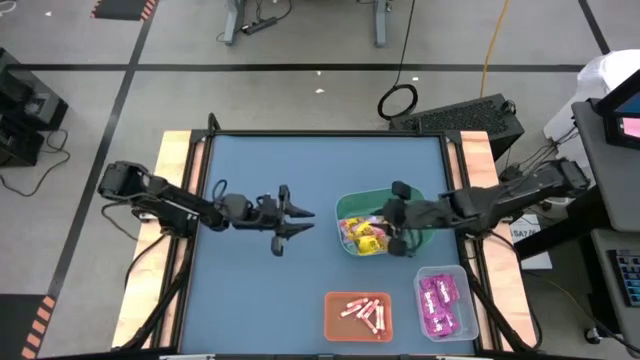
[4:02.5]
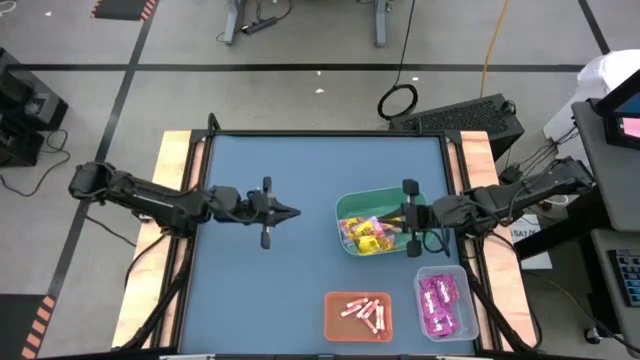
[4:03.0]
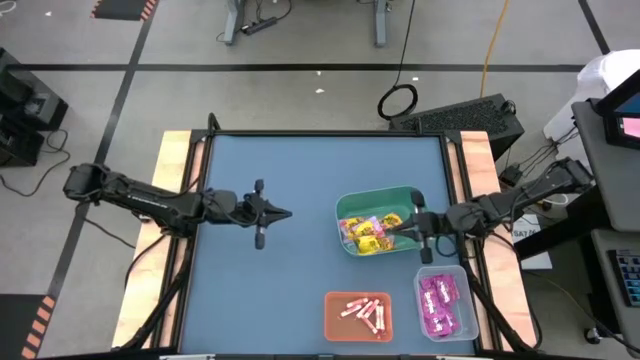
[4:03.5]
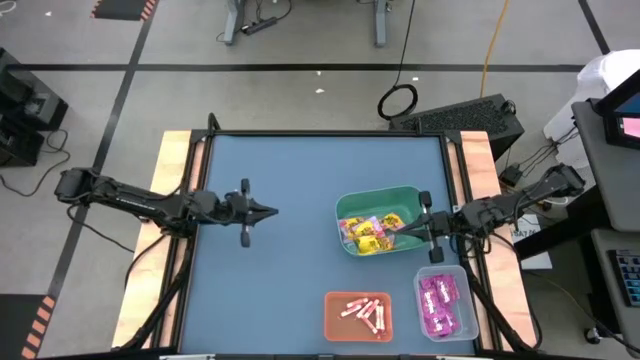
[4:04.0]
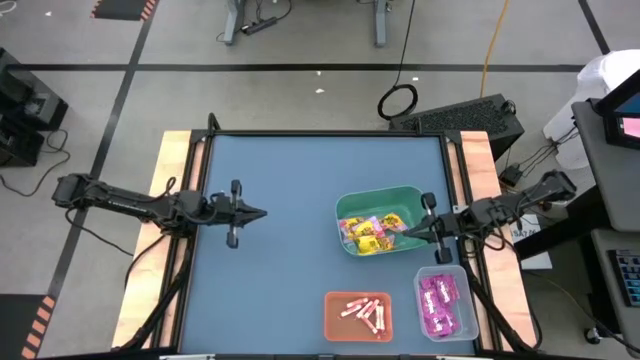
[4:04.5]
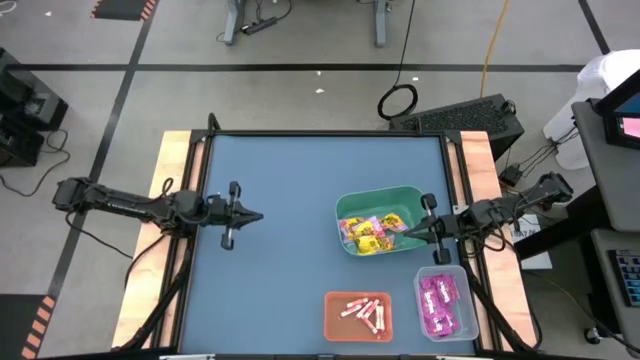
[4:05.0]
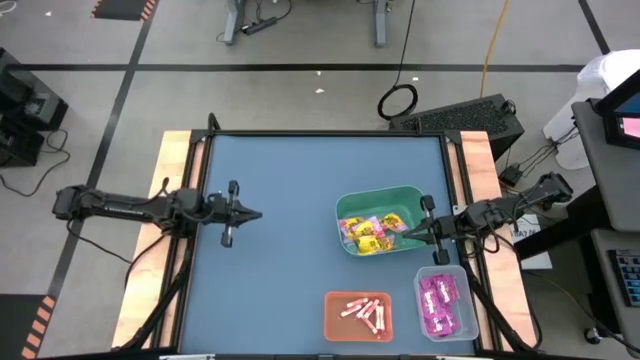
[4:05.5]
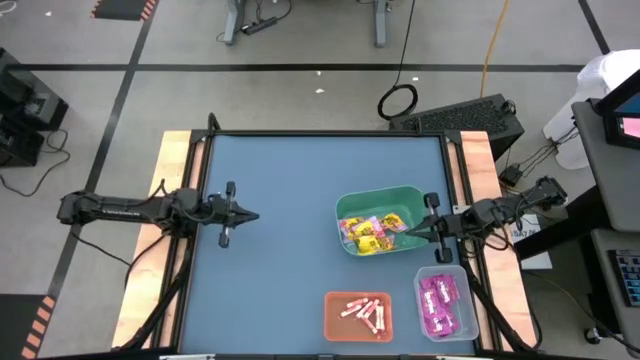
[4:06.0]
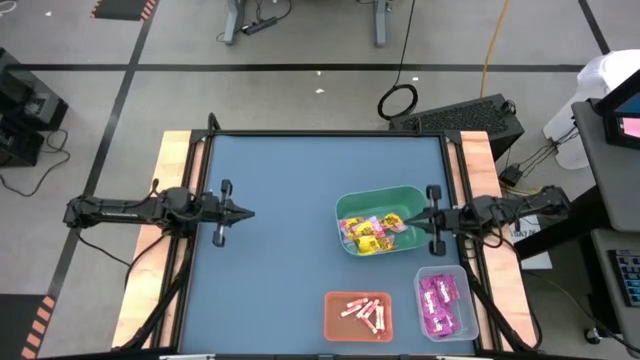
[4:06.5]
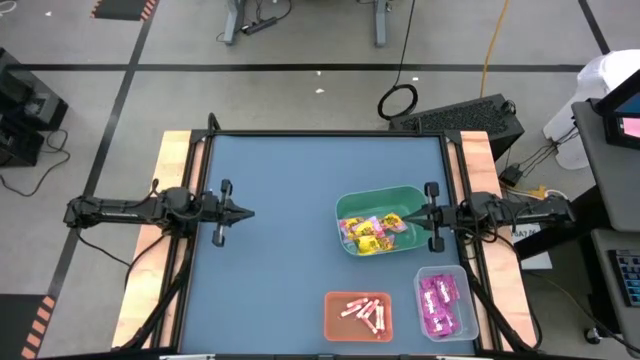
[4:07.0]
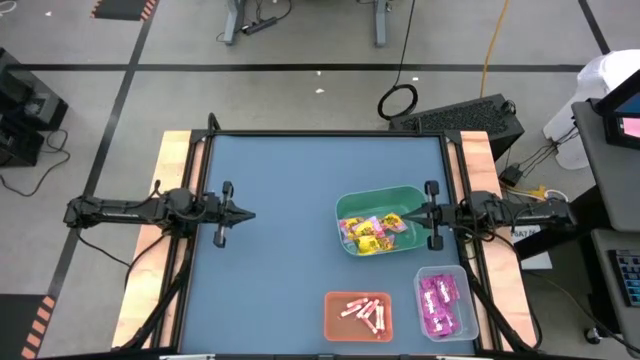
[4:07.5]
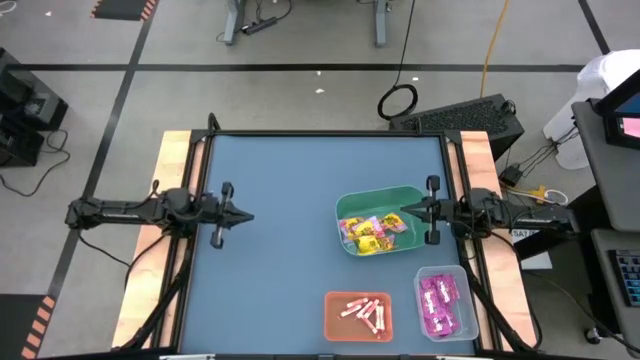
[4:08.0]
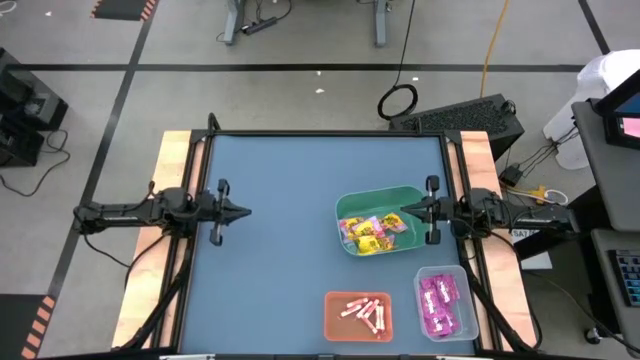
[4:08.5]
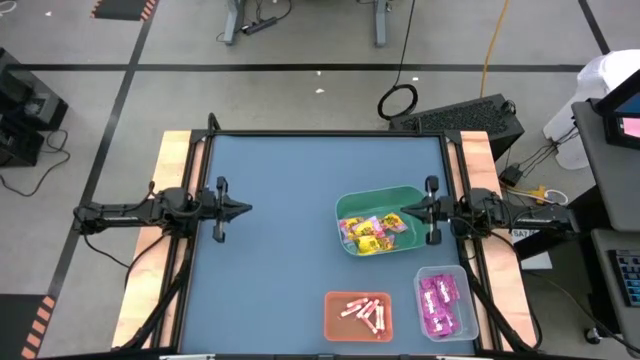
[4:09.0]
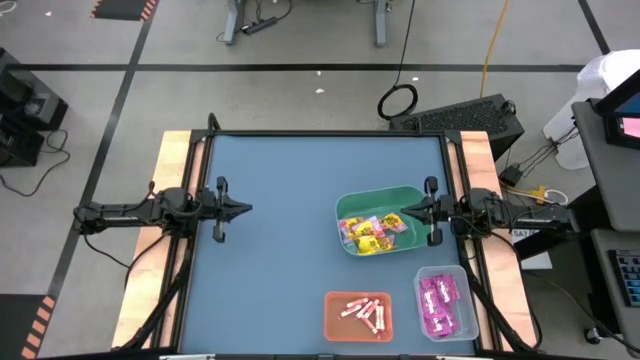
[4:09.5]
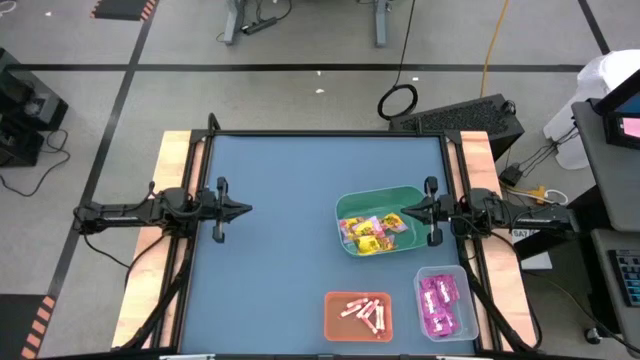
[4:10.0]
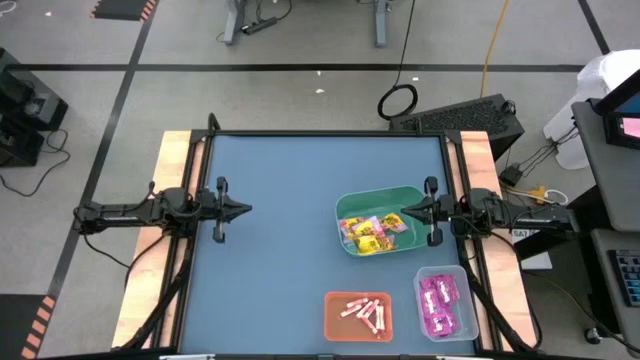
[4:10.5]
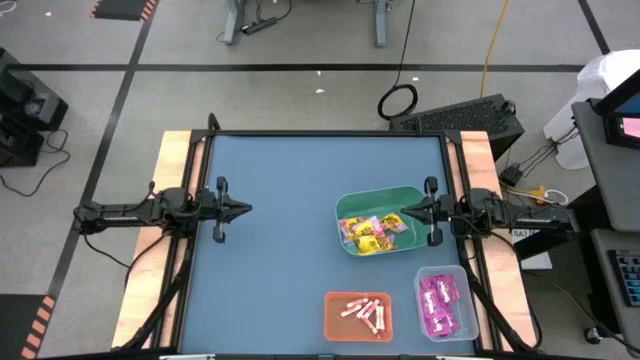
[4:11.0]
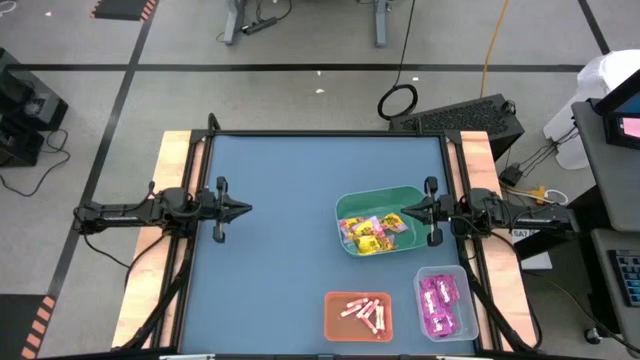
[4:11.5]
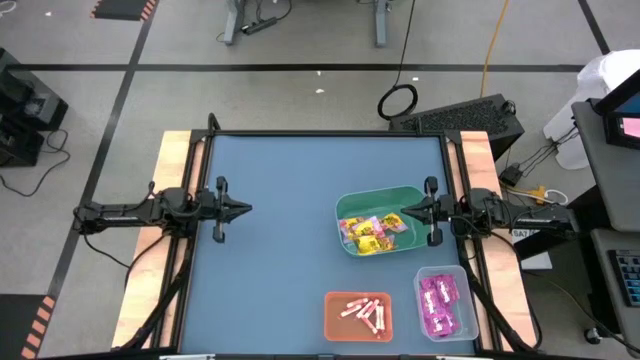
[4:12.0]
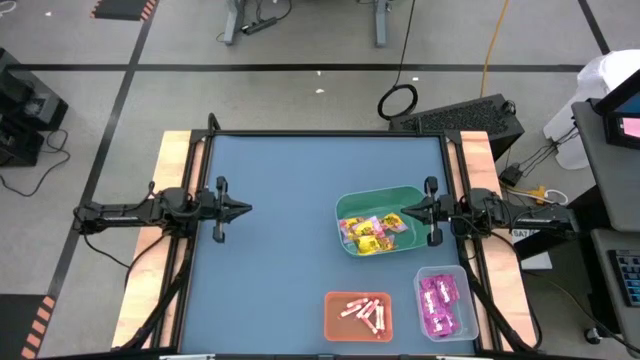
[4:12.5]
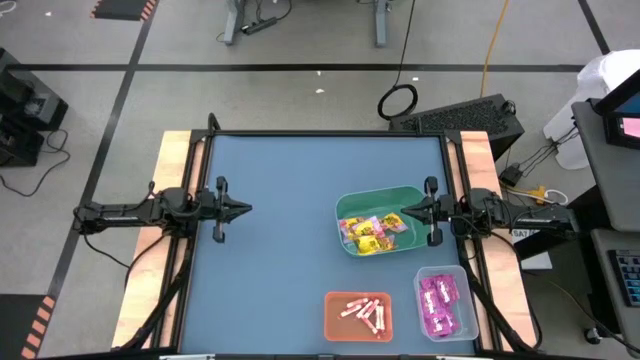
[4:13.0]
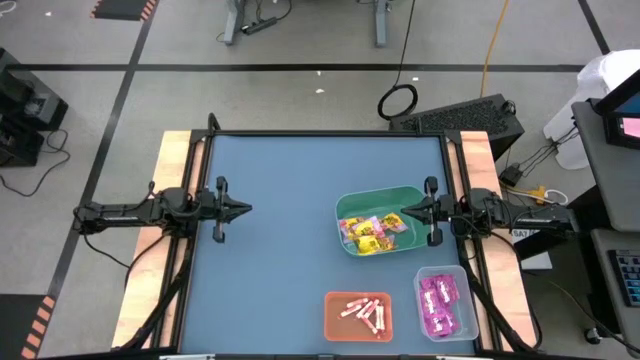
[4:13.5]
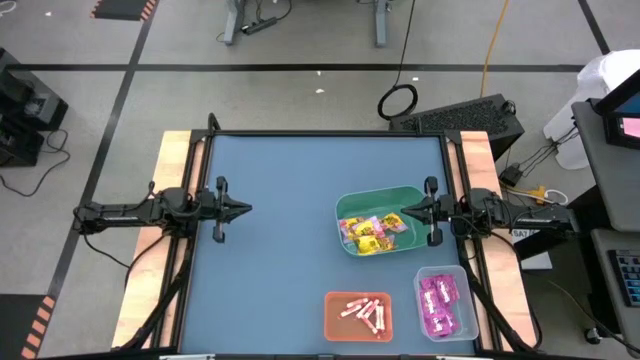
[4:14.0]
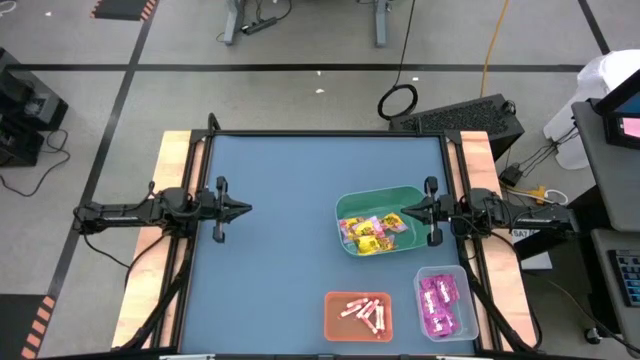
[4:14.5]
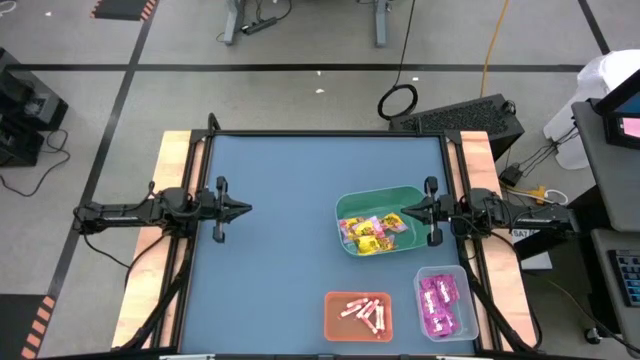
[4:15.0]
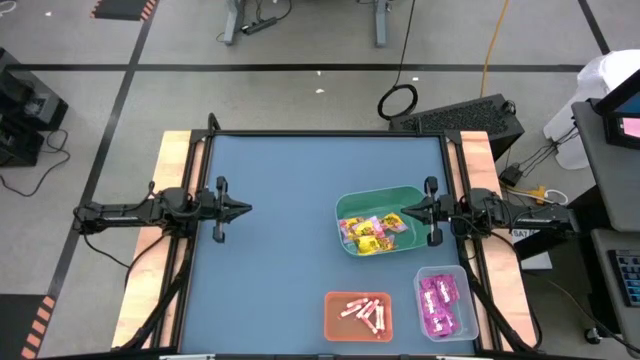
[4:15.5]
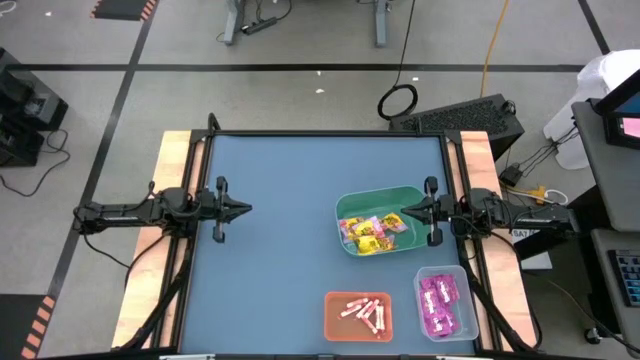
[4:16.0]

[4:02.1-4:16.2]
Task: Sort candy
Return to Home Position

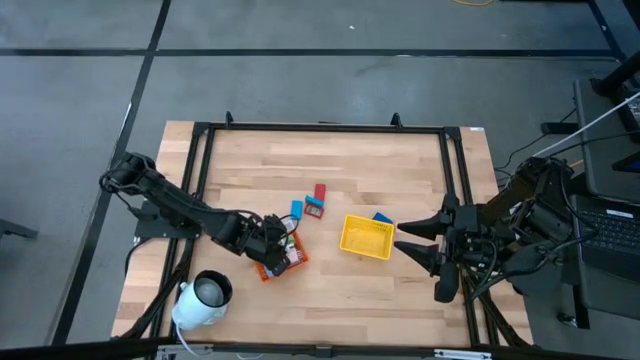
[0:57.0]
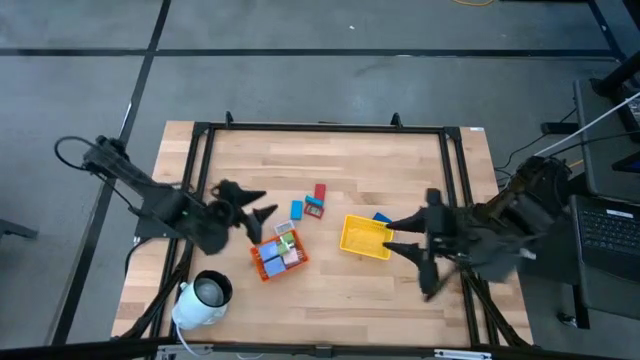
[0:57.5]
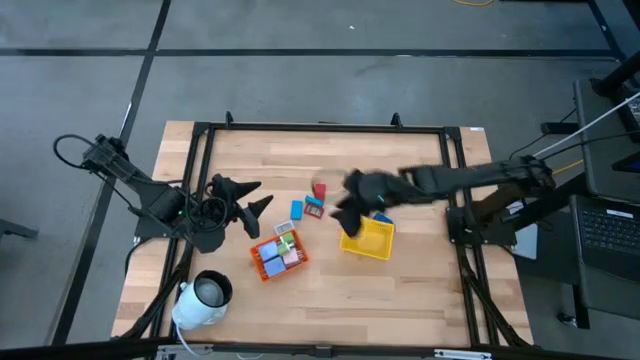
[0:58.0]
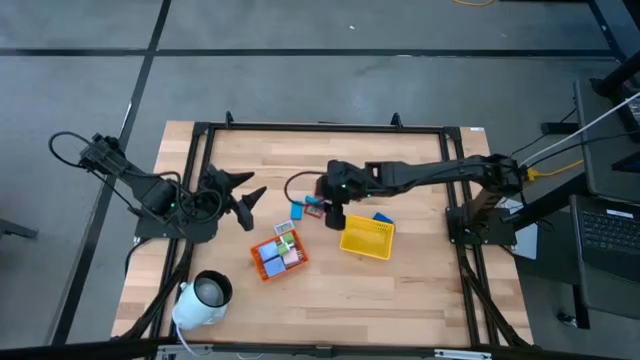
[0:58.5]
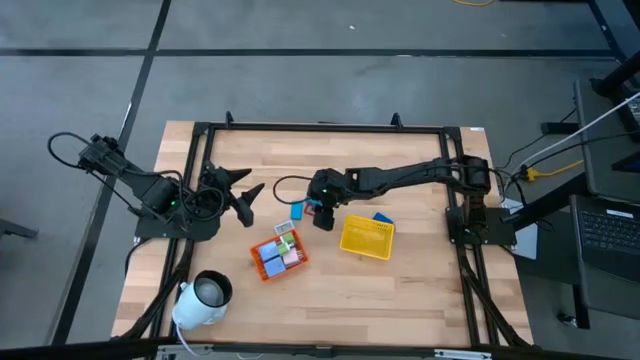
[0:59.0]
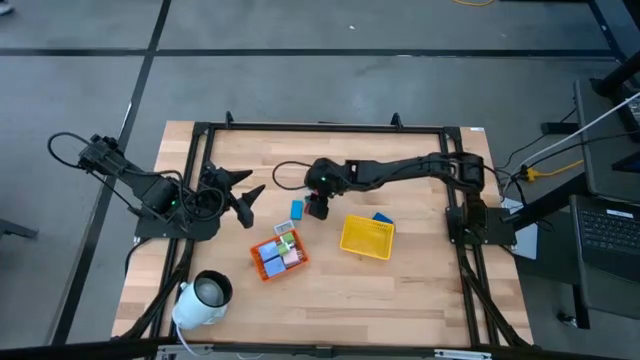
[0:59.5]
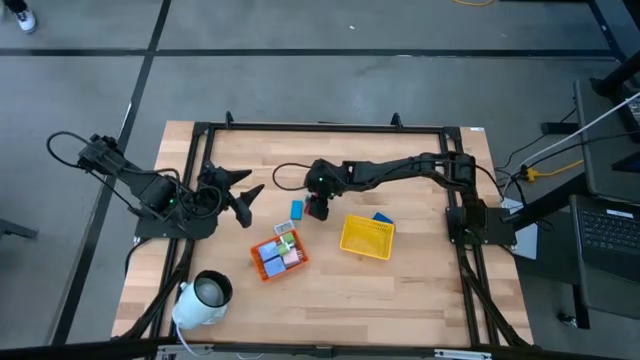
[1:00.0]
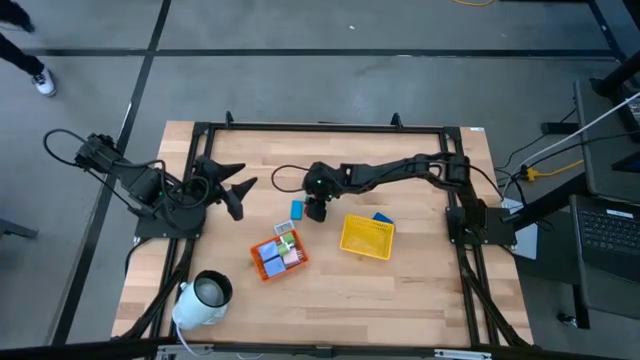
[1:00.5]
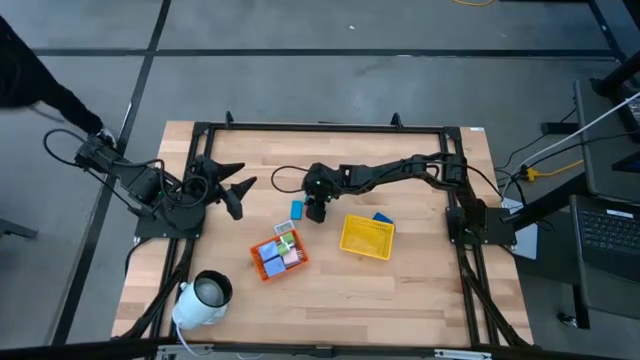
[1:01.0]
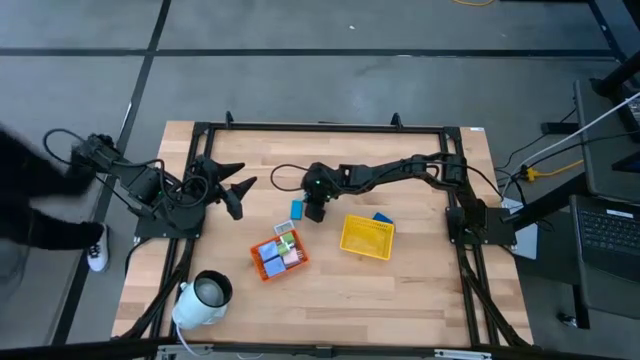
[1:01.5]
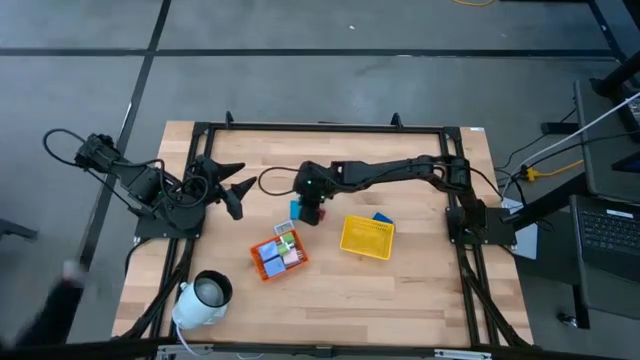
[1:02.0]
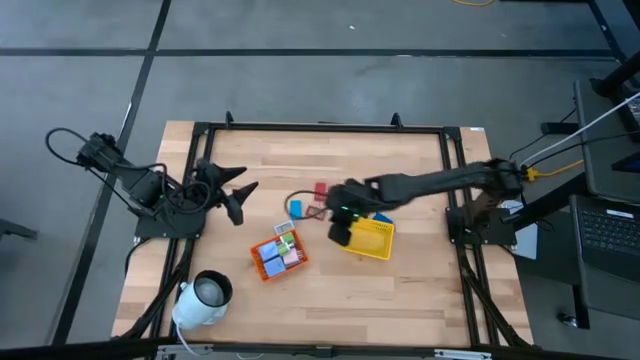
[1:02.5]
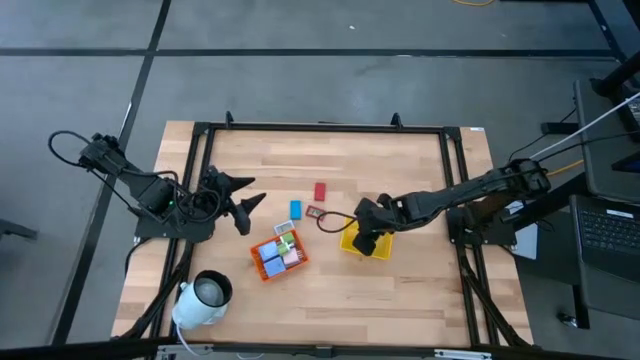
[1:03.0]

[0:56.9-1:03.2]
Task: Pick & Place Office items
Put the right light blue digital clock into the yellow bin
